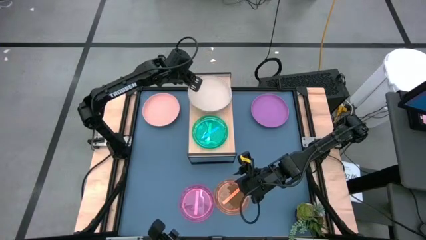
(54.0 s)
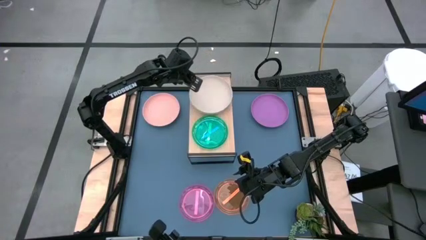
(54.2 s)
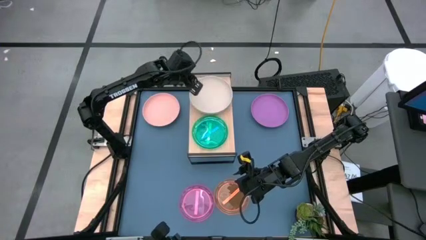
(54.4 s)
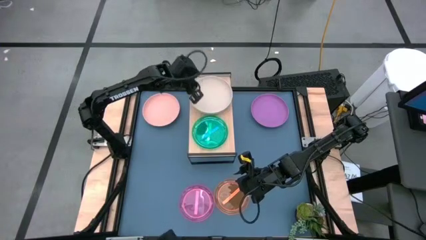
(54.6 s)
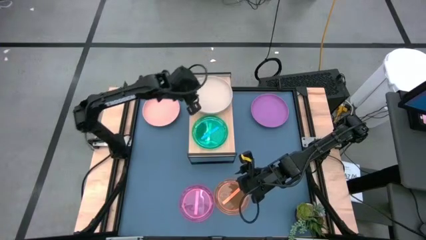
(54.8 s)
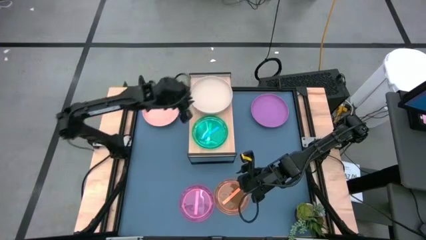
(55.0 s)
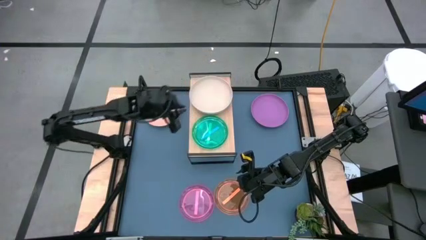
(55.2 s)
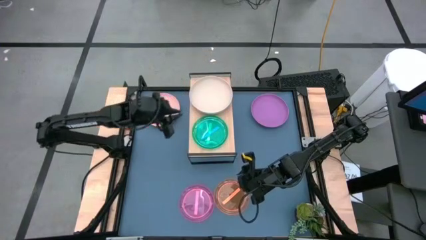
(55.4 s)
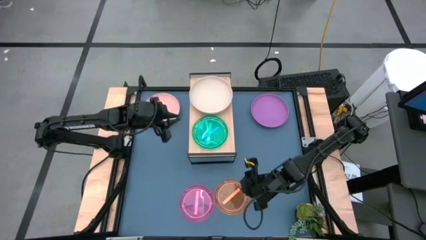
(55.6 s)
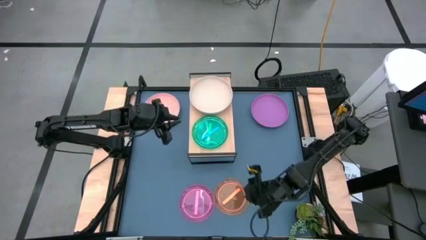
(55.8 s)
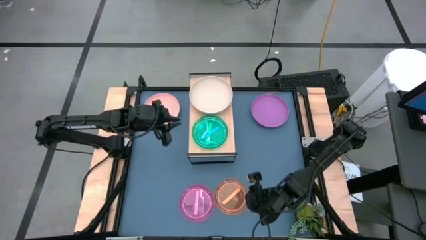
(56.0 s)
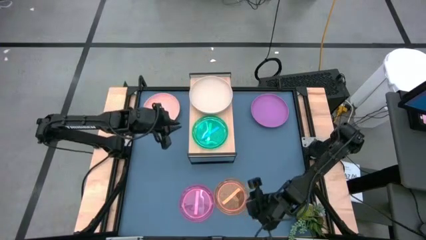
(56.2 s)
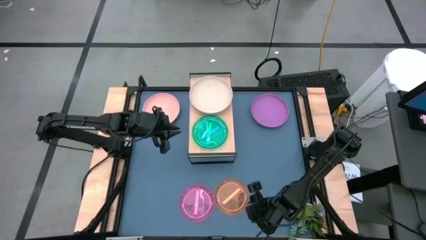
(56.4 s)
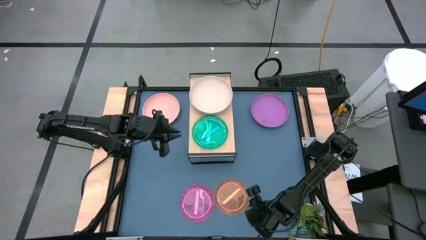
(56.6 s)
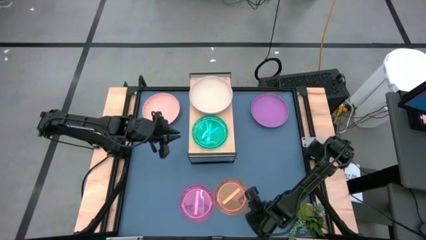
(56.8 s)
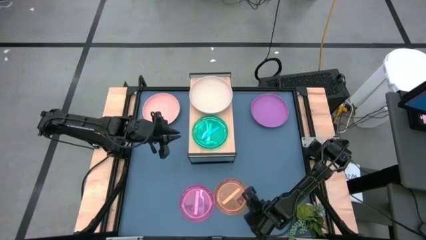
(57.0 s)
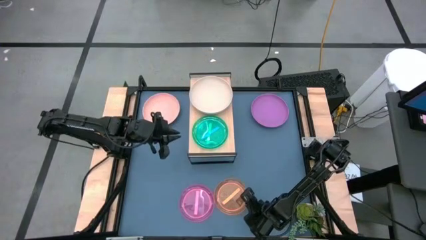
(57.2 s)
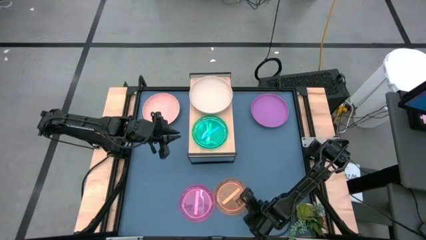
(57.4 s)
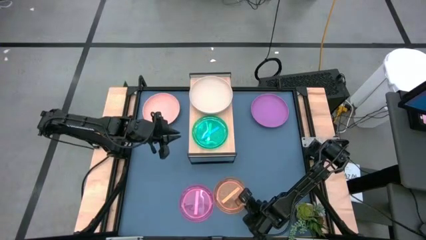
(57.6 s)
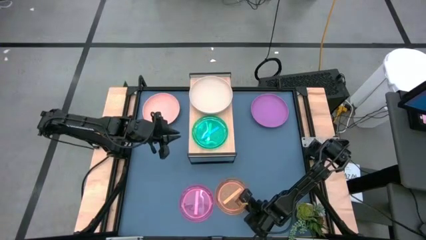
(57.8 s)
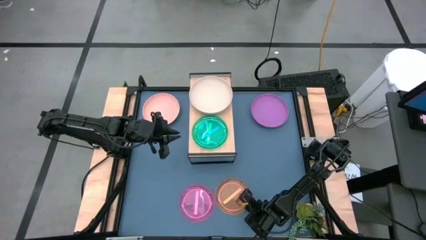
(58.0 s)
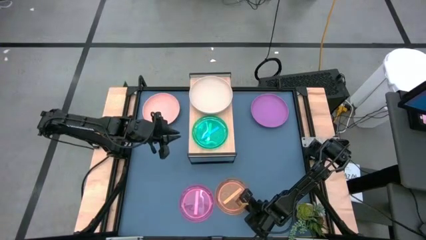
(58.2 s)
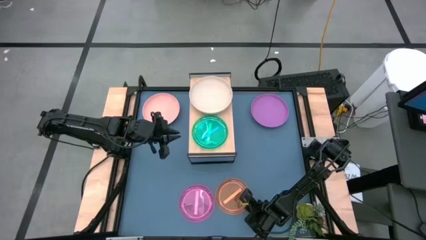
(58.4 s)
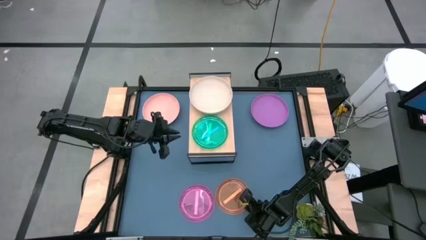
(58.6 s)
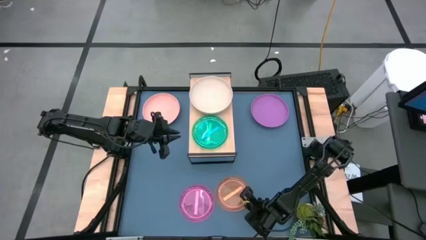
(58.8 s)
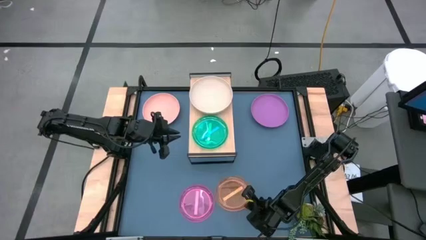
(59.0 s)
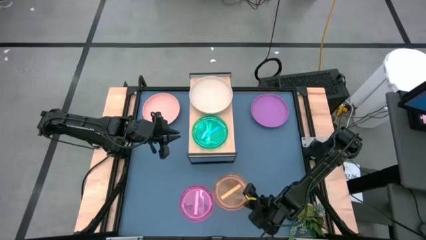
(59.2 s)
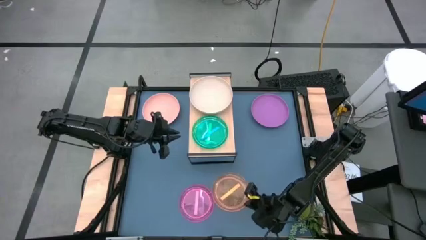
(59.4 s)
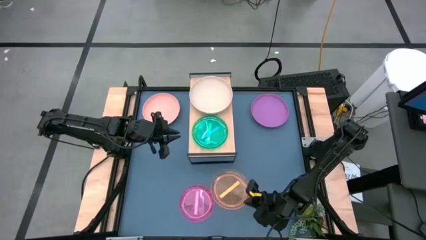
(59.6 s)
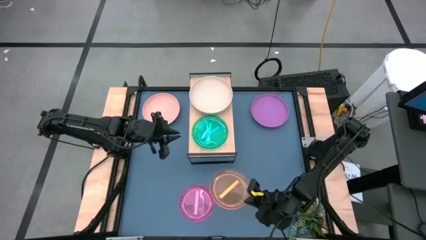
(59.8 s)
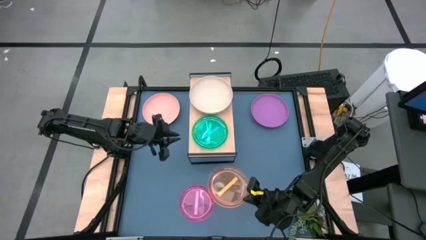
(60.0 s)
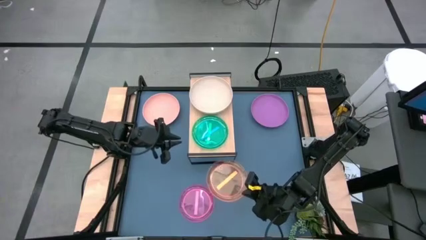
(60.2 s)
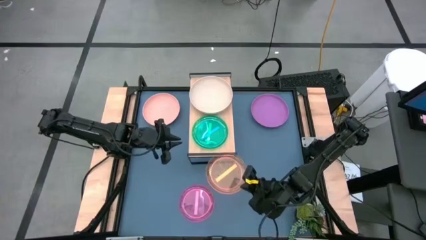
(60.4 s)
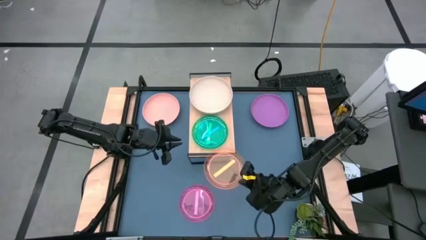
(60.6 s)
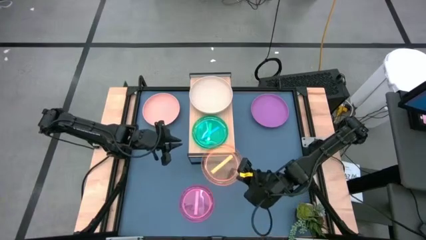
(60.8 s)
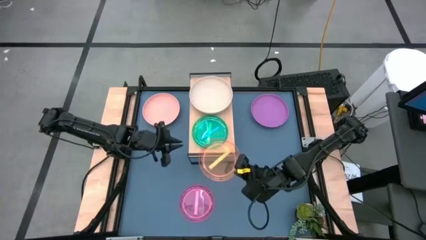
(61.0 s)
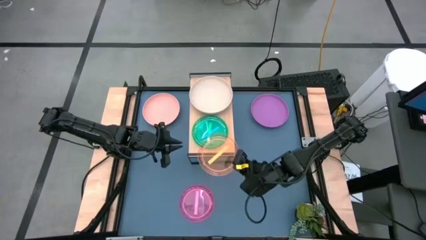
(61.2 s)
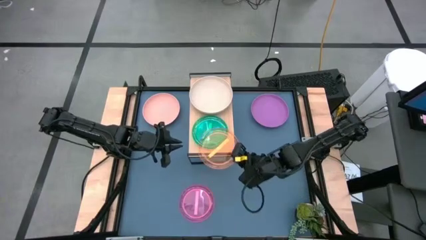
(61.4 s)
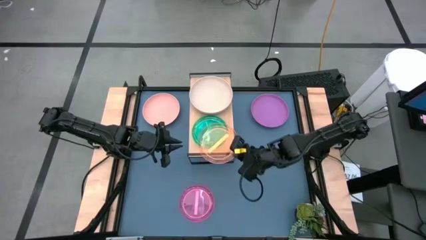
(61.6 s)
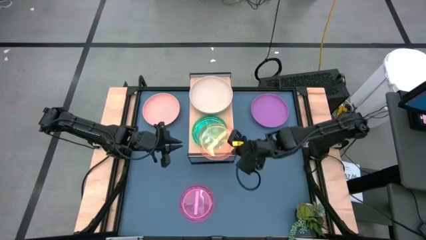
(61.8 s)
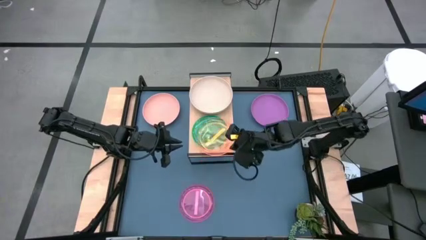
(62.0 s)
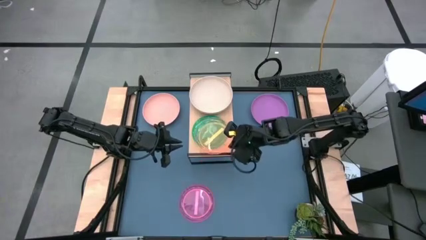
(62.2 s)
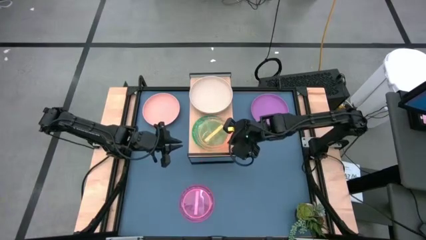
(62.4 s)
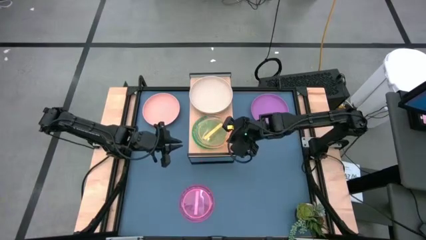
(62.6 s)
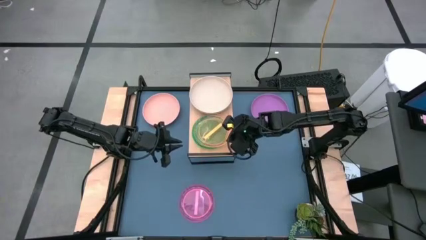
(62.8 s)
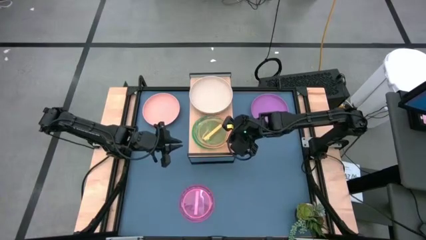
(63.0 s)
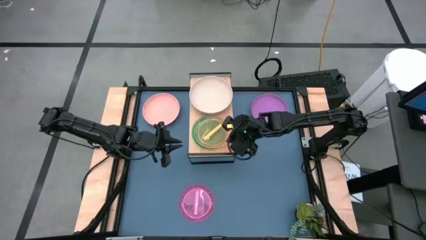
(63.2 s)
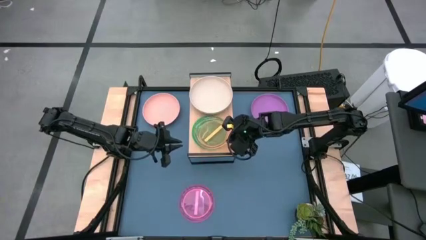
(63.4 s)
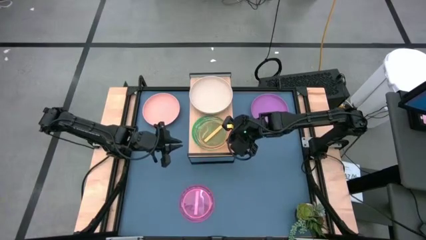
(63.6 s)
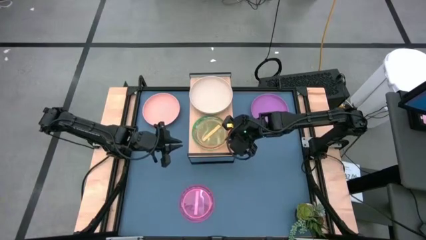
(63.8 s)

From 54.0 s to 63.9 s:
Task: Place and stack plates onto a shelf
Stack the orange plate on top of the blue plate on the shelf

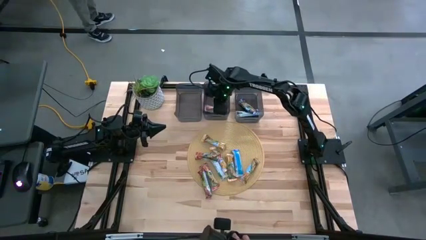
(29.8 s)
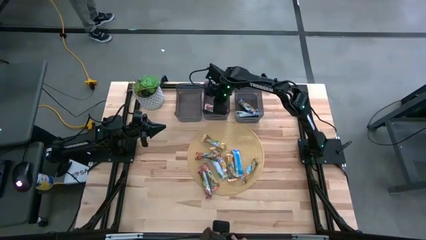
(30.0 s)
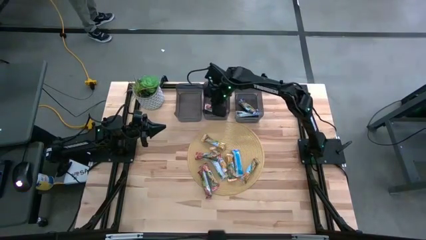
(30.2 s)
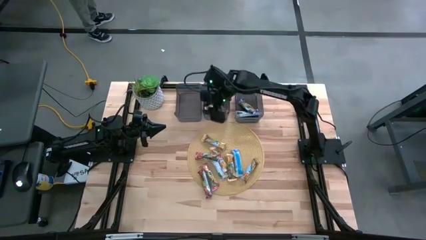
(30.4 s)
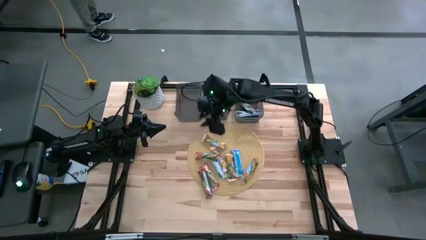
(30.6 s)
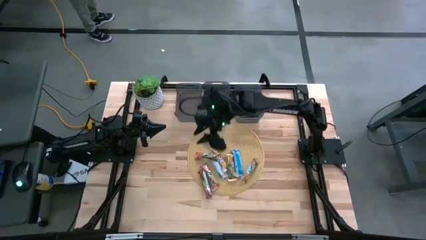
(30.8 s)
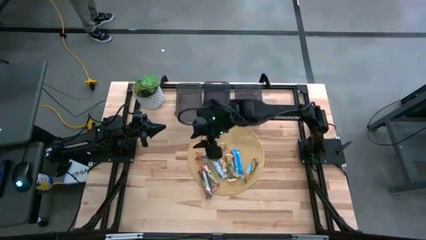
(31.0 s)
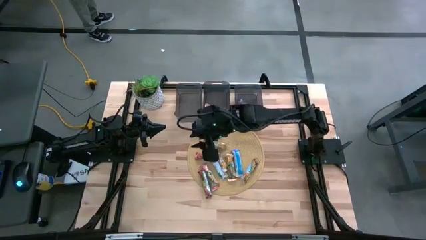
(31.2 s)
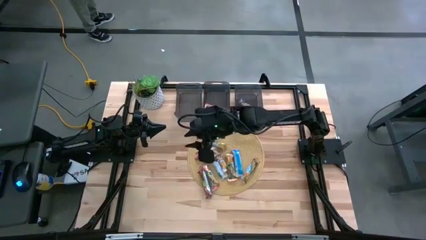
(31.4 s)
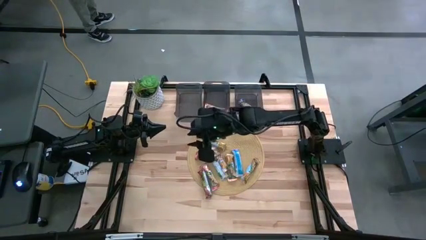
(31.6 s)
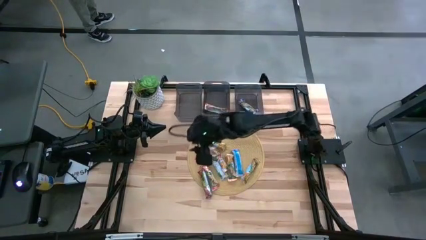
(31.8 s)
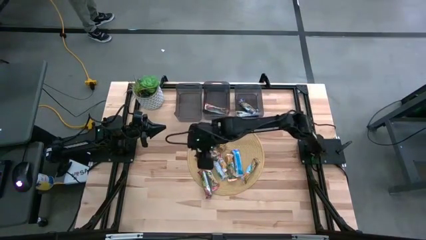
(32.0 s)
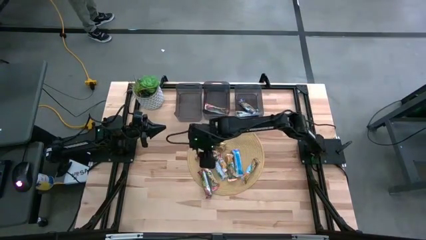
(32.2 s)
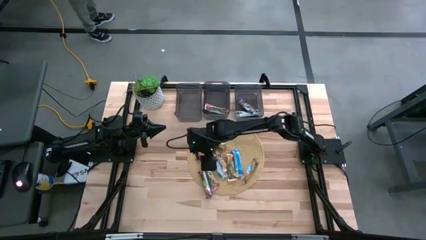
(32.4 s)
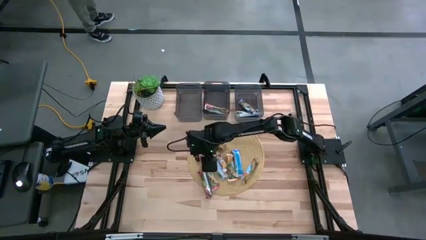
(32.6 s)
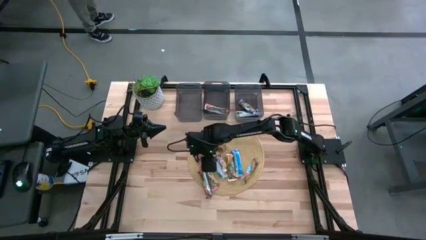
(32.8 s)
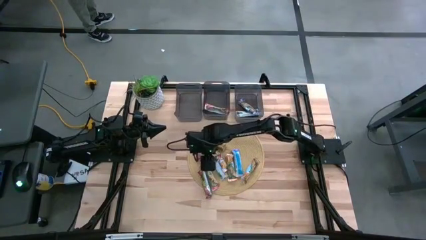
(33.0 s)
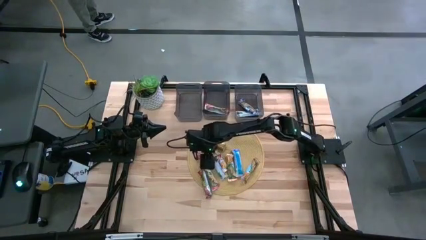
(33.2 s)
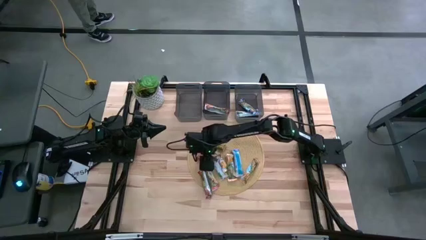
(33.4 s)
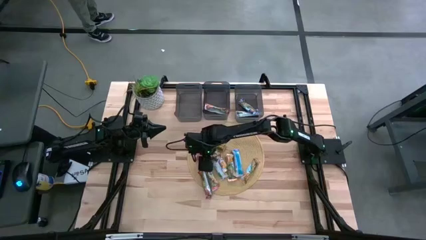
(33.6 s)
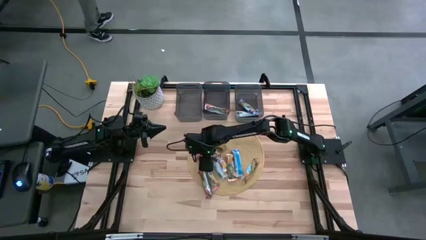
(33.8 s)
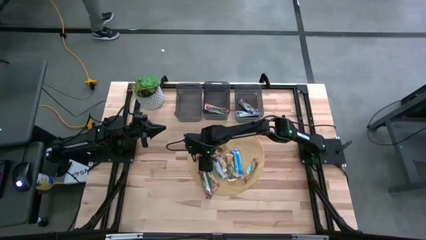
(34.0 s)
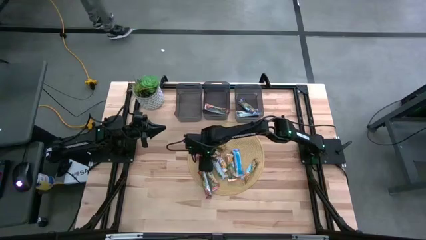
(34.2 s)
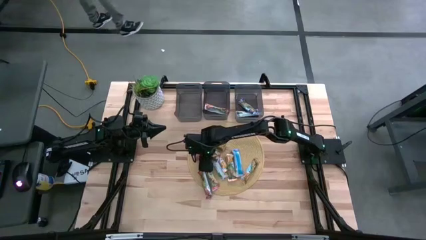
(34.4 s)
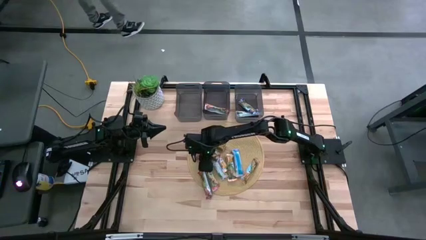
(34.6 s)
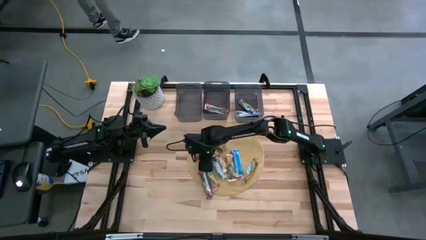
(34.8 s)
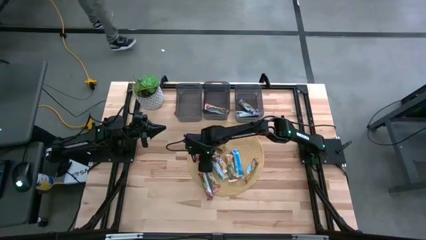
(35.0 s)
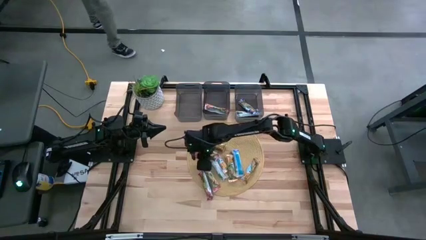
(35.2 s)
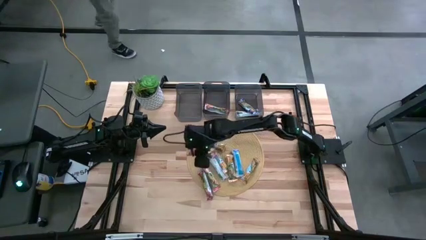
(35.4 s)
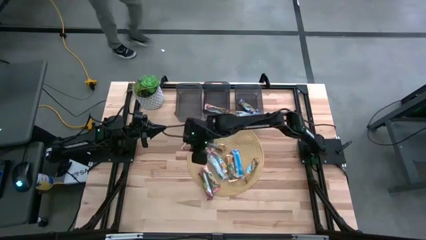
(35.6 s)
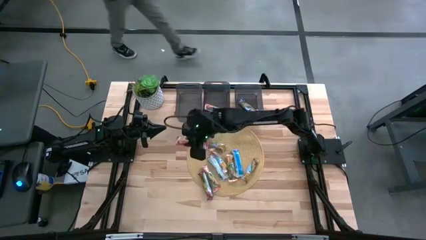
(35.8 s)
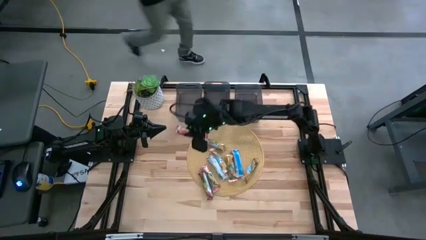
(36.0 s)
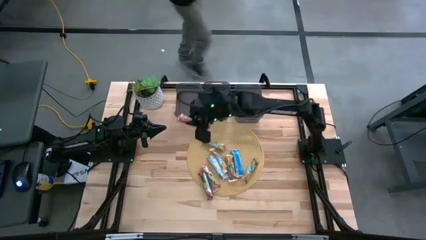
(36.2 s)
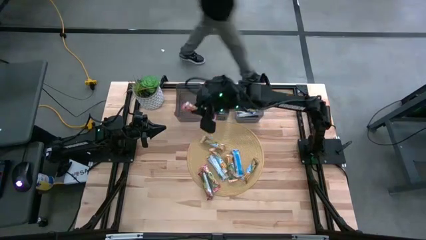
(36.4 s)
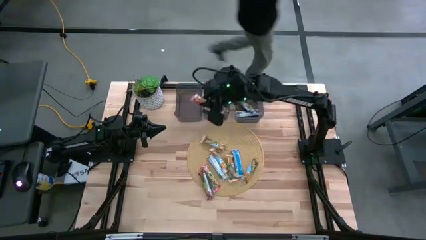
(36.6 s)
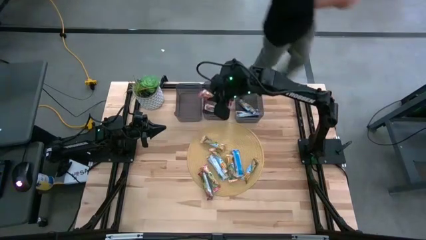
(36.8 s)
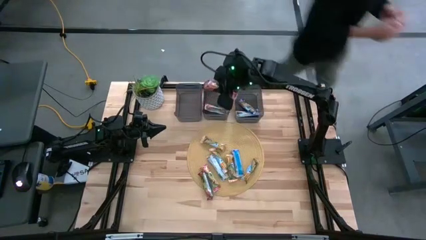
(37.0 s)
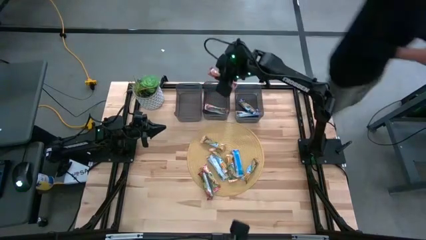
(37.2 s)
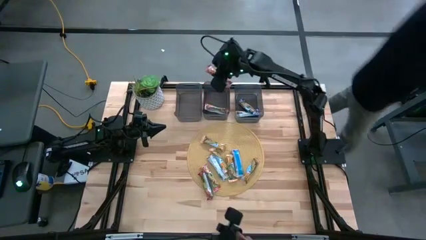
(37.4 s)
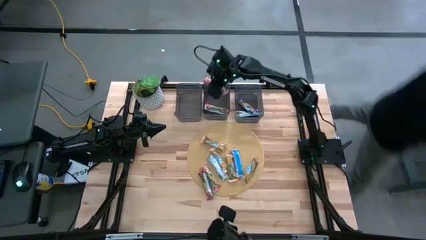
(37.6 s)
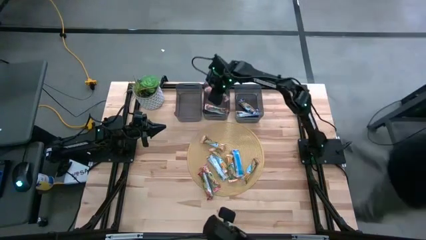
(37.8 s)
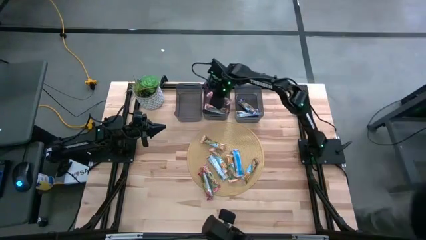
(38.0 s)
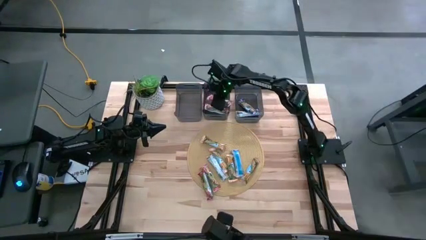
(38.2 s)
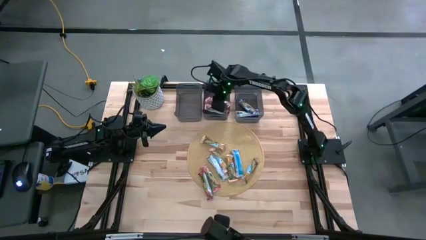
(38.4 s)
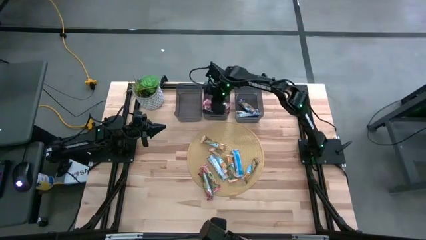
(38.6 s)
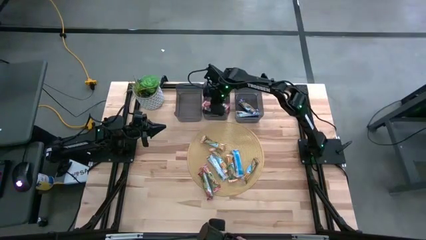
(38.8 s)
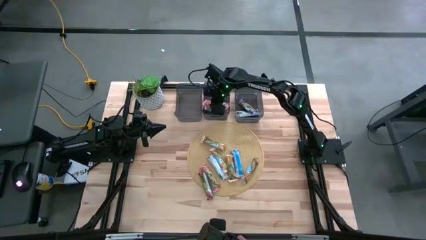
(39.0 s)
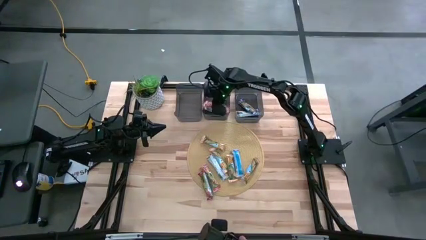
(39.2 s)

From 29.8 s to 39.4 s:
Task: Pick and place Granola Bars by type
Put the red granola bar into the middle black bin
